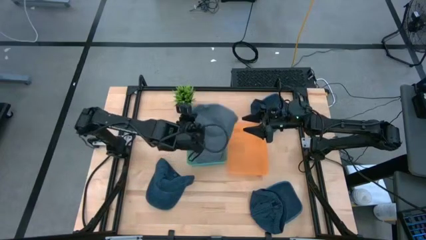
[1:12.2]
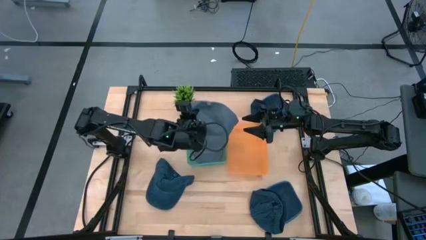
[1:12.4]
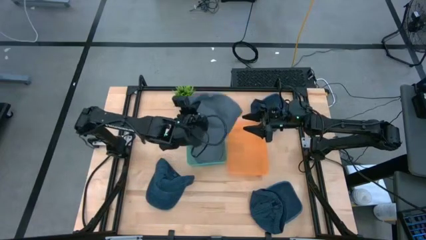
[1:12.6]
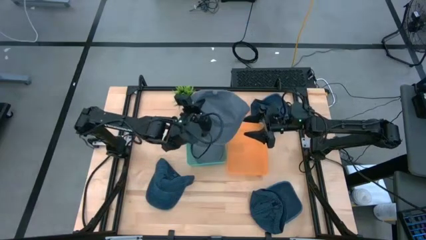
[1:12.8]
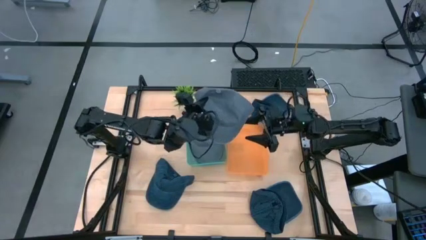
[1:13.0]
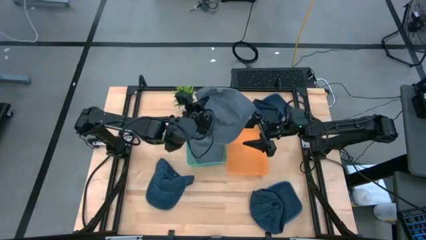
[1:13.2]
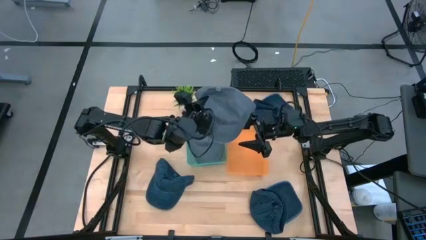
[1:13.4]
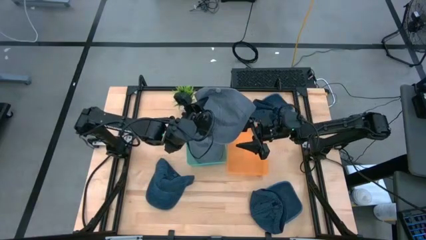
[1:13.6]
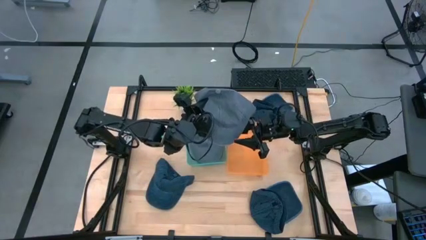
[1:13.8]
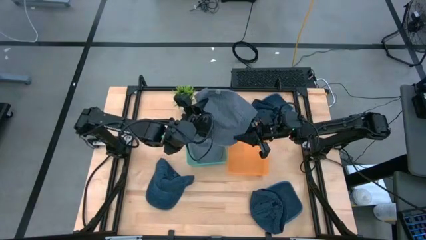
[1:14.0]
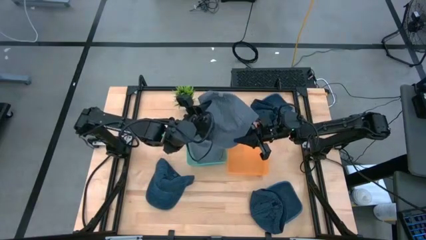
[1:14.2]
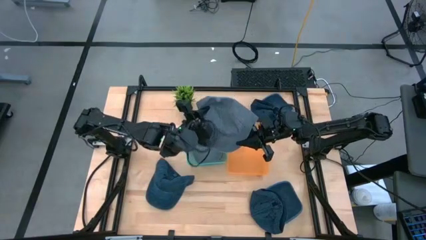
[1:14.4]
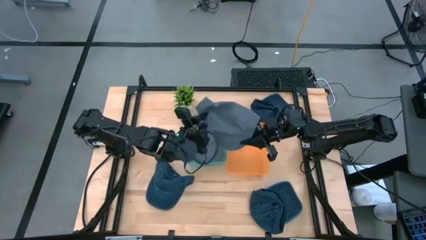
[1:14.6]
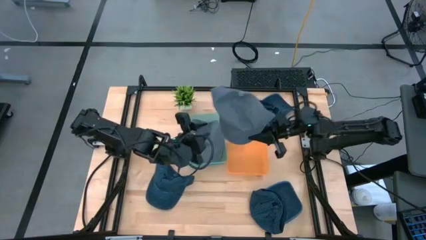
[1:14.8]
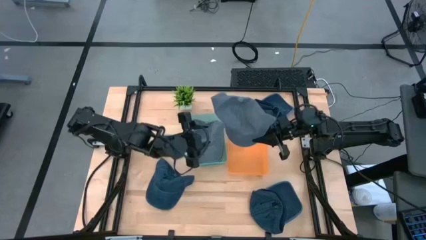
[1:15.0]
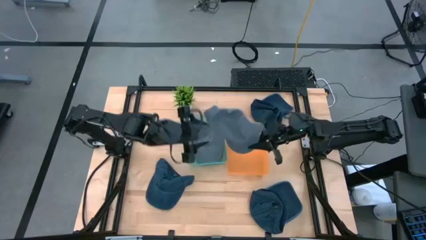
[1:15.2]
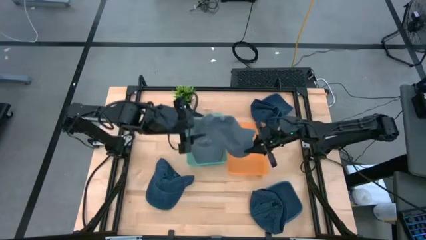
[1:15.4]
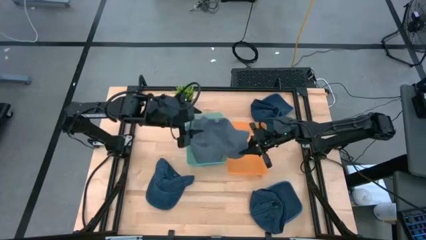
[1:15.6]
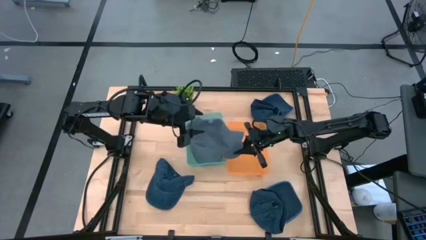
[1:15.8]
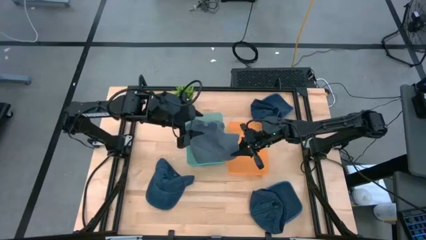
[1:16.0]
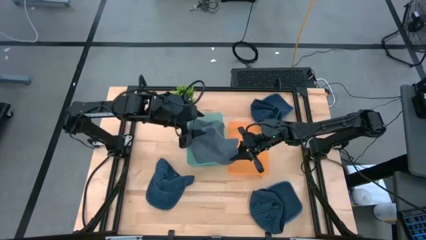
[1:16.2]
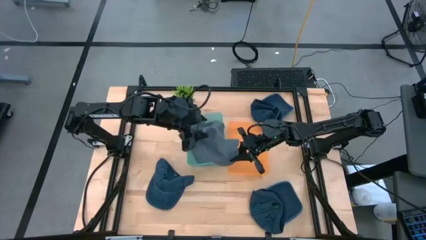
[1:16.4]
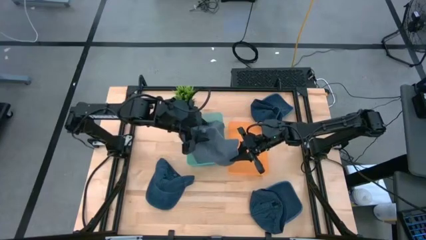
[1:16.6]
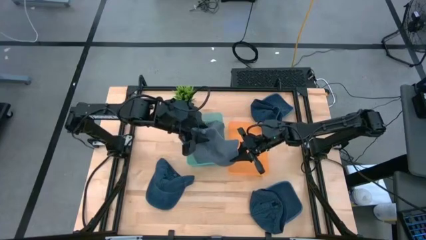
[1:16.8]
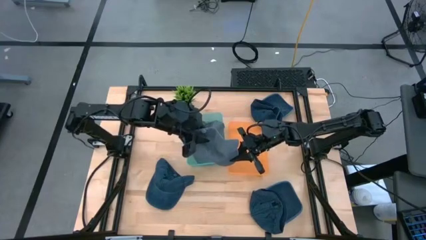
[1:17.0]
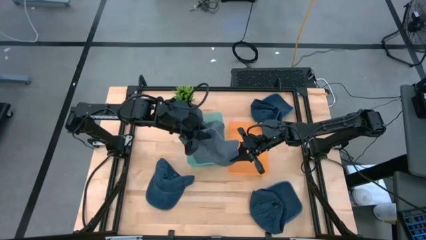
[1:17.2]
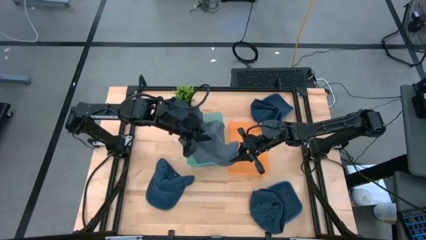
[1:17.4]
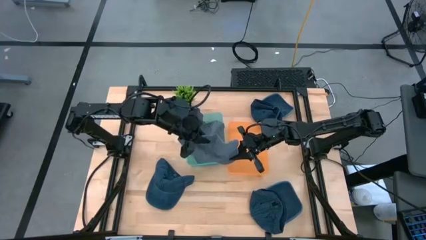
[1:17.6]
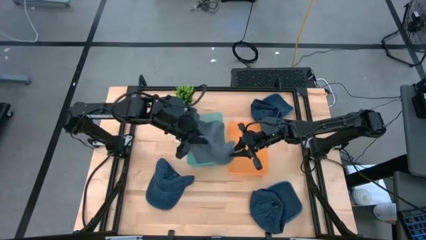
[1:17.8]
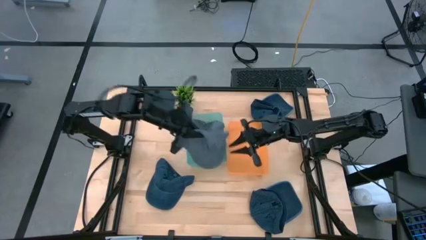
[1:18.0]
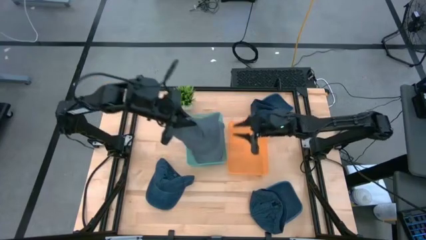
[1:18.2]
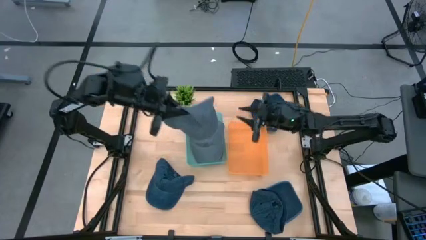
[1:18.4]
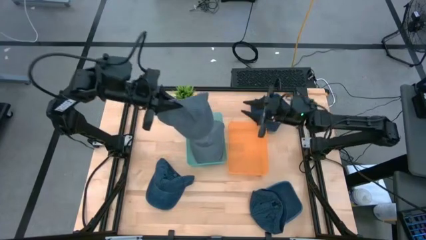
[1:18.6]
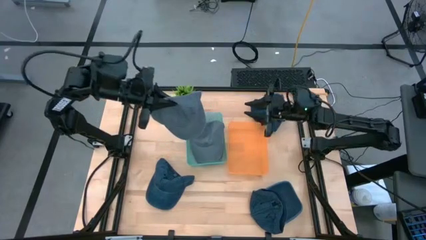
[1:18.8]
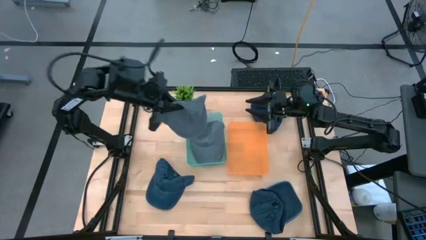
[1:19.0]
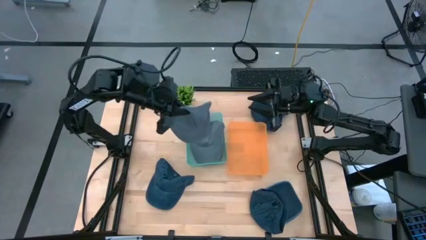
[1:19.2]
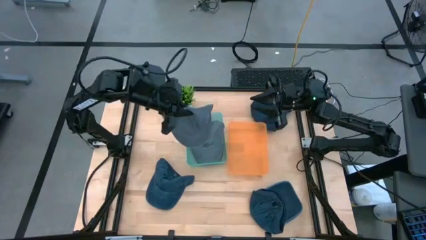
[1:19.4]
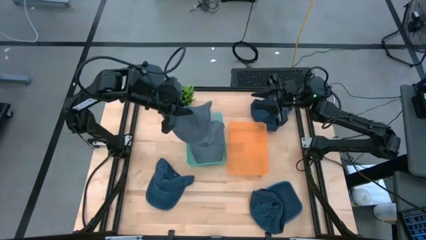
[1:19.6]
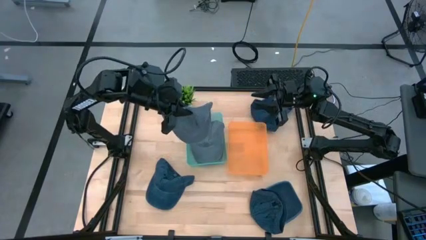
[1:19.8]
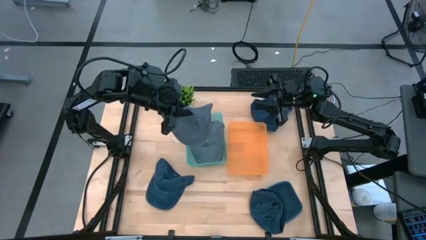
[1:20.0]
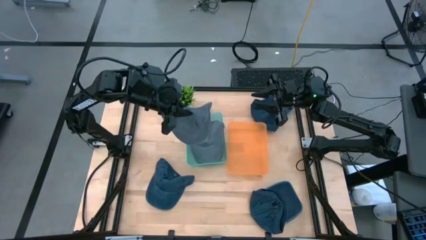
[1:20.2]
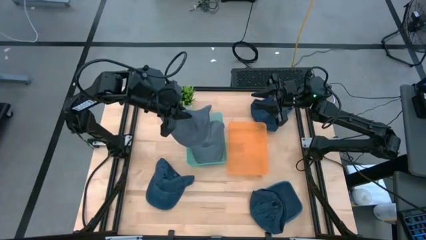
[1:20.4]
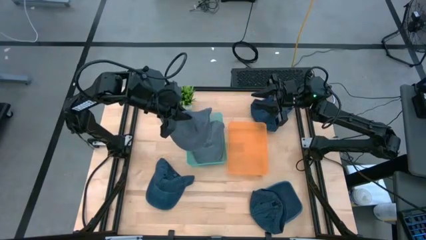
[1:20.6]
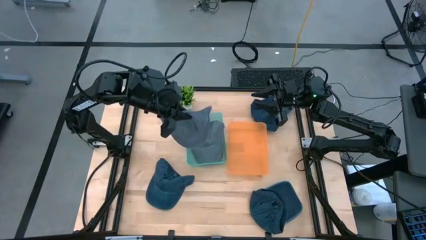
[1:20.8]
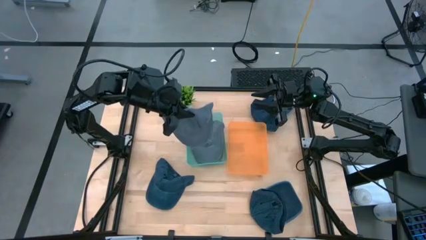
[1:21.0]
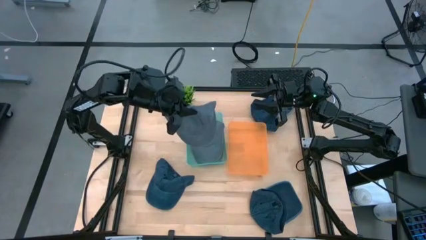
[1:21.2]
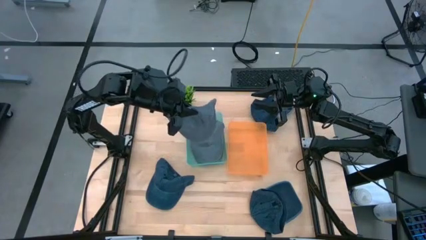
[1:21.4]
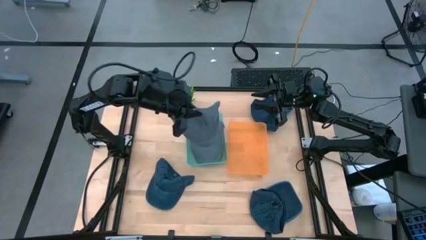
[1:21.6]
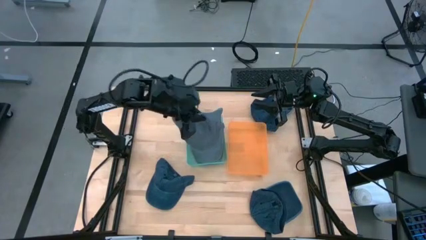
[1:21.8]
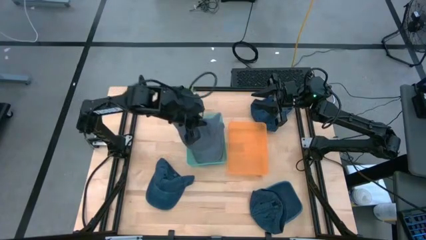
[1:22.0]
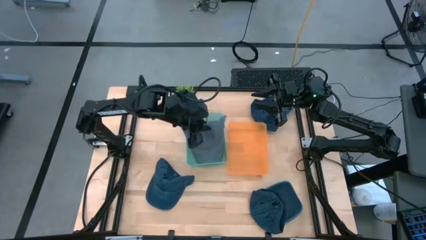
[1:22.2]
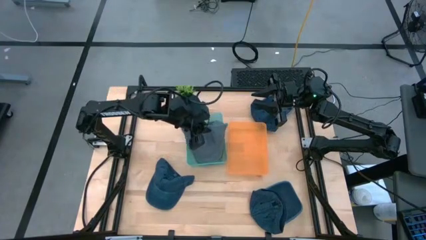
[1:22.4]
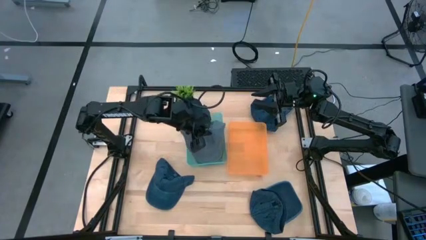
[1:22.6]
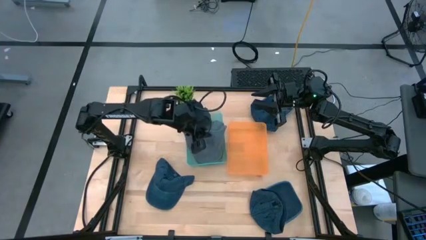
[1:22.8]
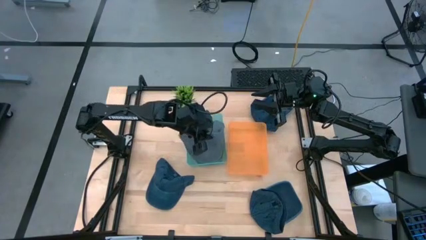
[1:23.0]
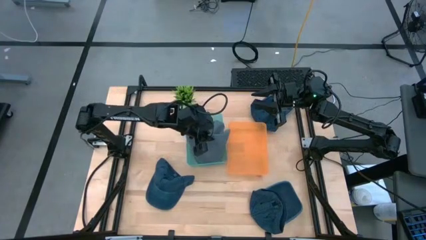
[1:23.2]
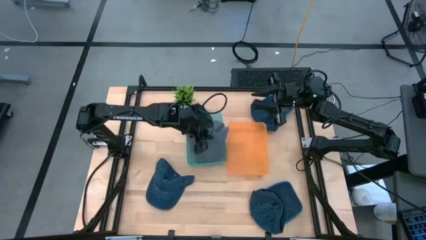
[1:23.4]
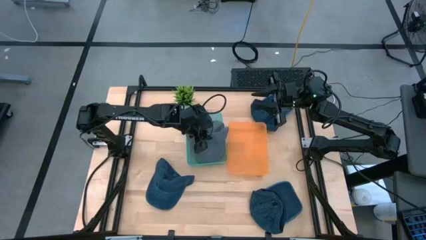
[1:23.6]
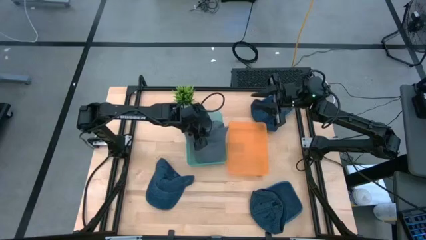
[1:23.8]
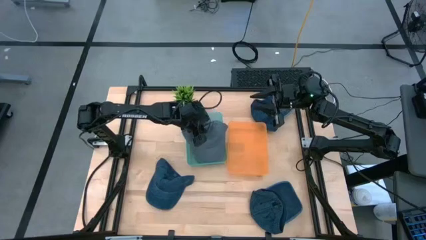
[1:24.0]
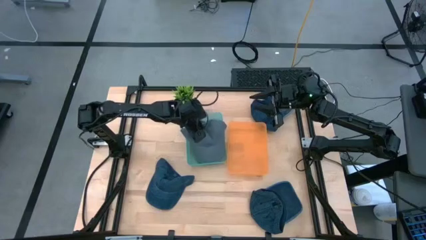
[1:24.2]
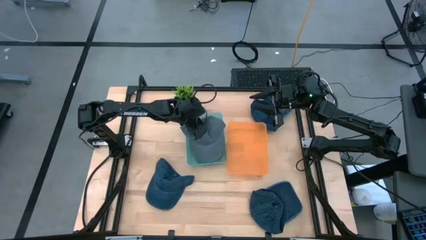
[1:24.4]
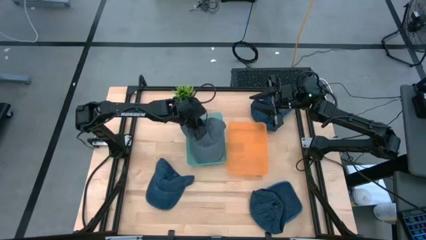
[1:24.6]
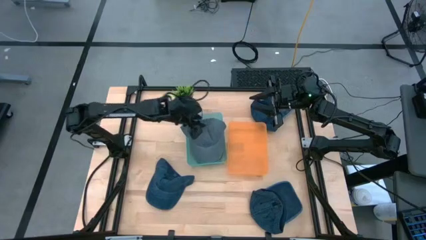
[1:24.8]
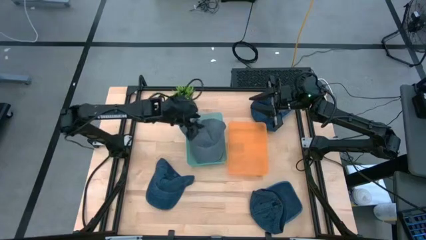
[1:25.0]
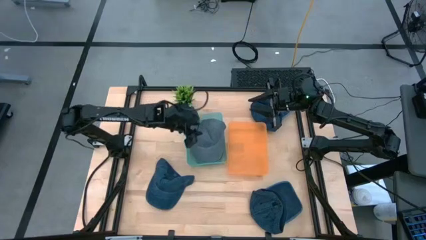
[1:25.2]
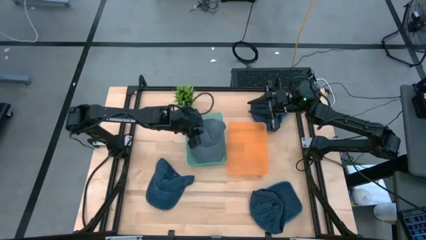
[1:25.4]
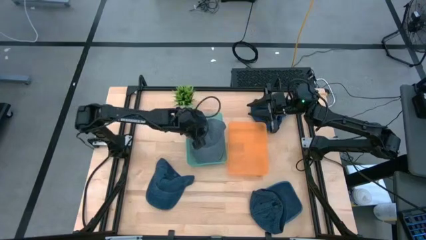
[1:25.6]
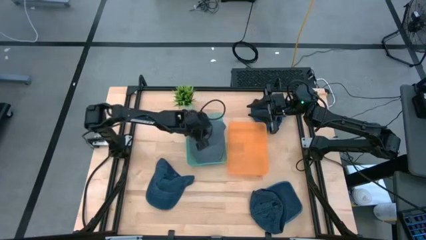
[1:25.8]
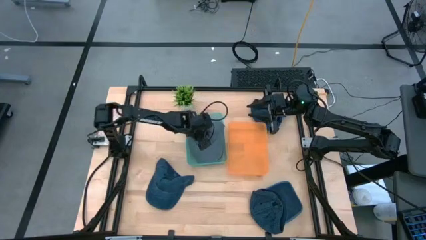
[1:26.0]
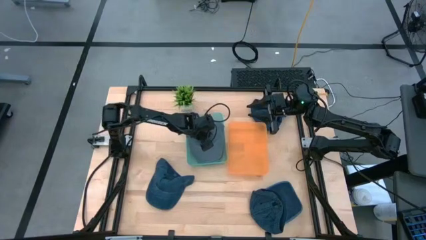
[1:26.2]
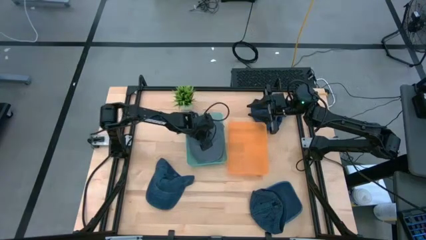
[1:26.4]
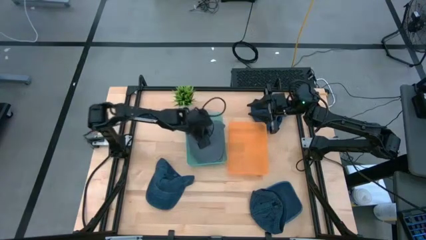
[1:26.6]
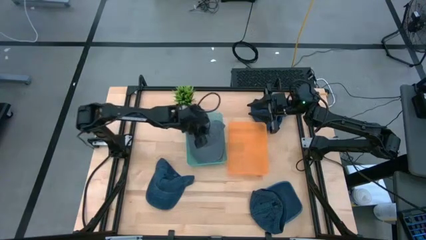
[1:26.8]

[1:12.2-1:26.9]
Task: Pick & Place hat
Put the gray cap into the green bin
